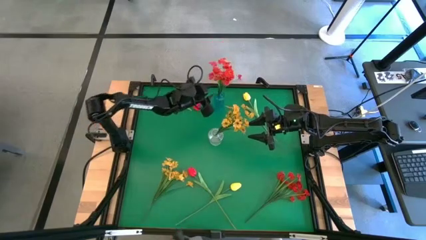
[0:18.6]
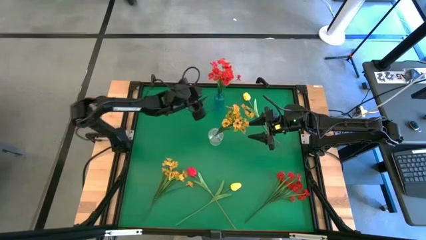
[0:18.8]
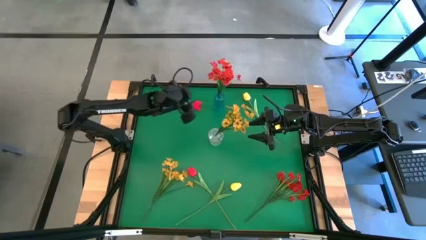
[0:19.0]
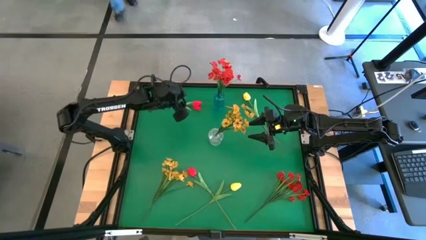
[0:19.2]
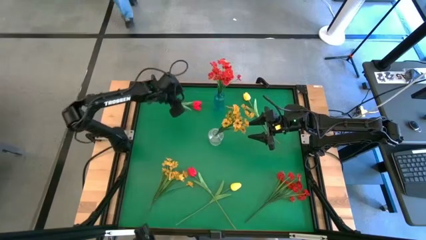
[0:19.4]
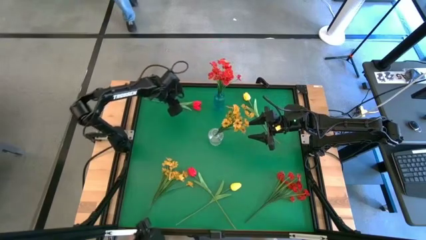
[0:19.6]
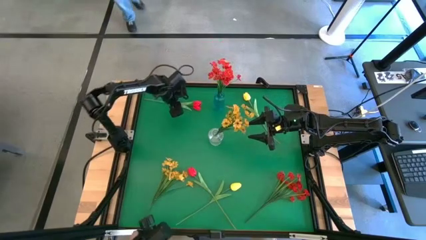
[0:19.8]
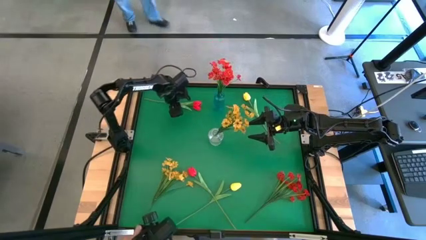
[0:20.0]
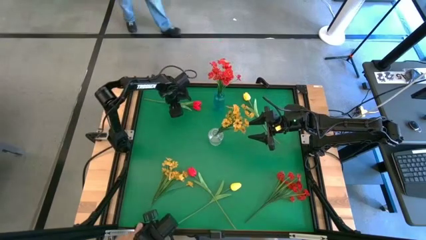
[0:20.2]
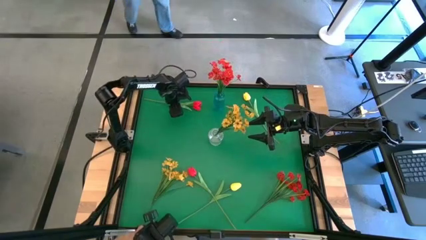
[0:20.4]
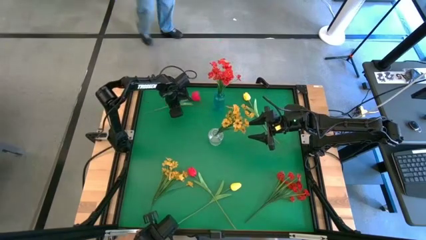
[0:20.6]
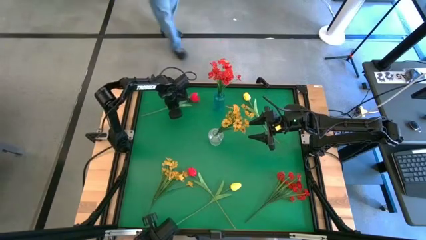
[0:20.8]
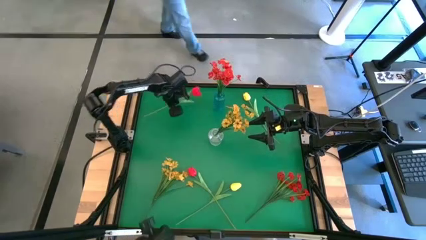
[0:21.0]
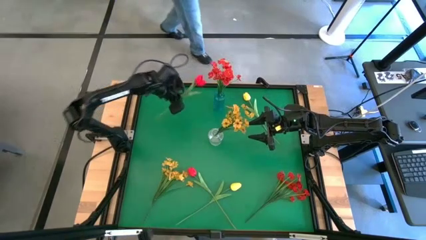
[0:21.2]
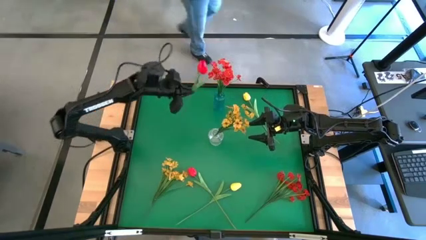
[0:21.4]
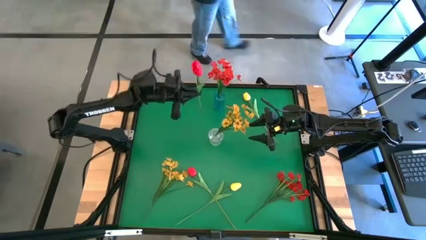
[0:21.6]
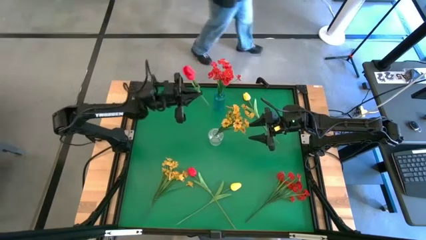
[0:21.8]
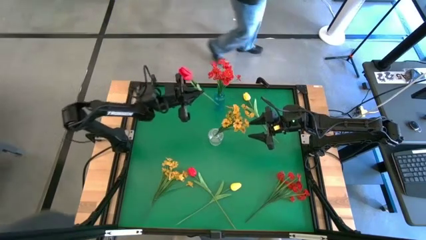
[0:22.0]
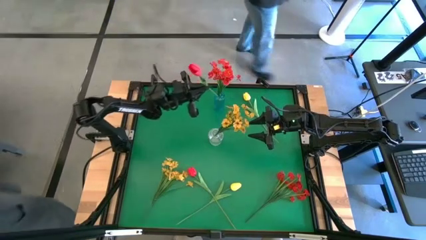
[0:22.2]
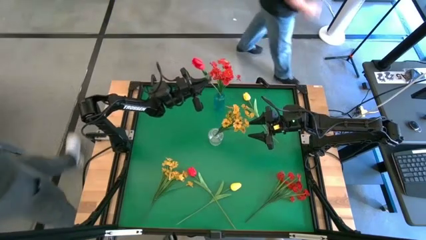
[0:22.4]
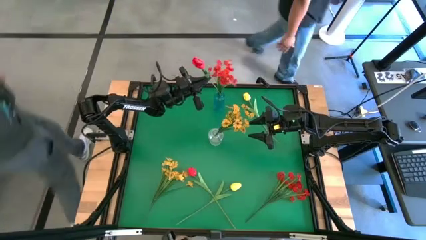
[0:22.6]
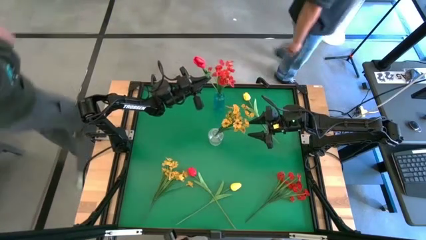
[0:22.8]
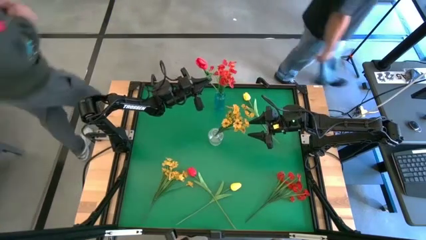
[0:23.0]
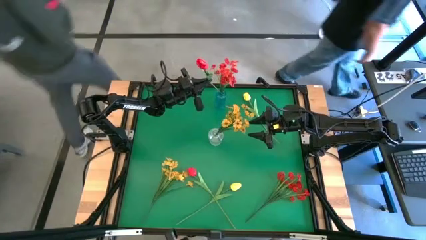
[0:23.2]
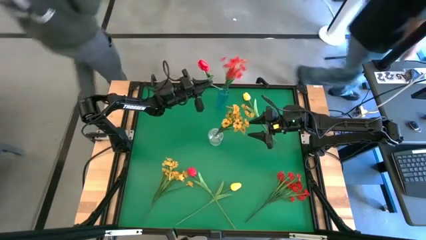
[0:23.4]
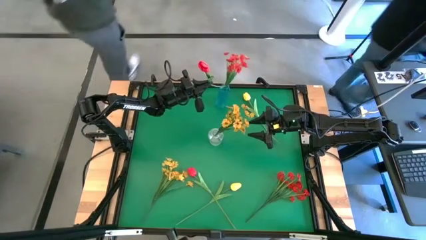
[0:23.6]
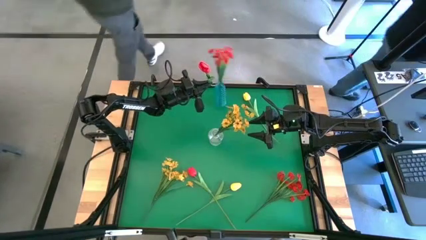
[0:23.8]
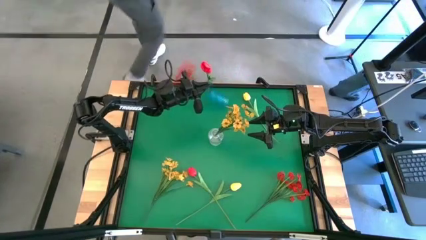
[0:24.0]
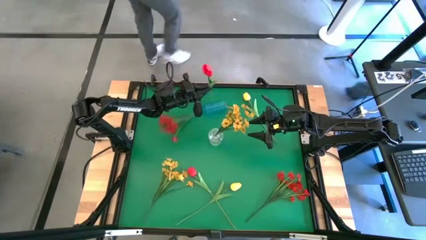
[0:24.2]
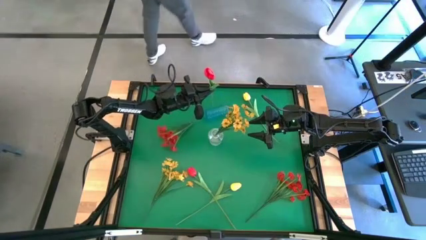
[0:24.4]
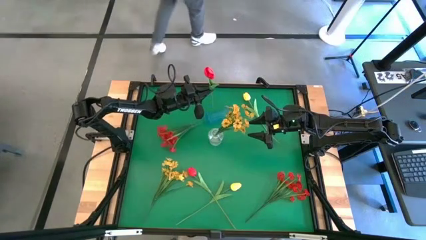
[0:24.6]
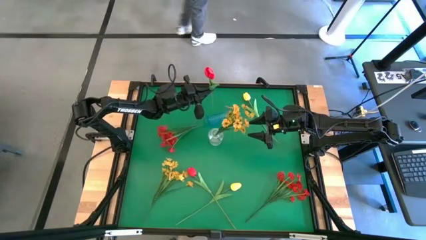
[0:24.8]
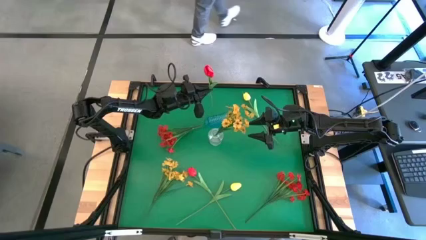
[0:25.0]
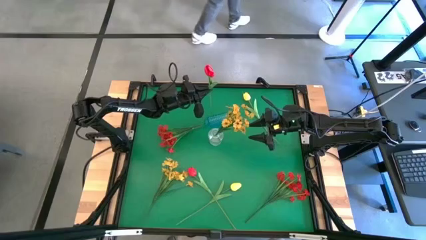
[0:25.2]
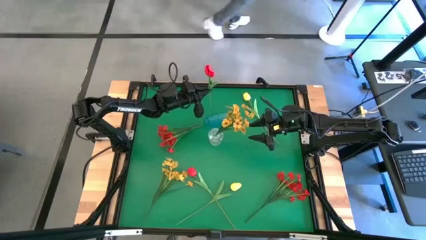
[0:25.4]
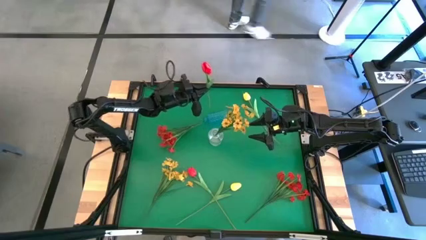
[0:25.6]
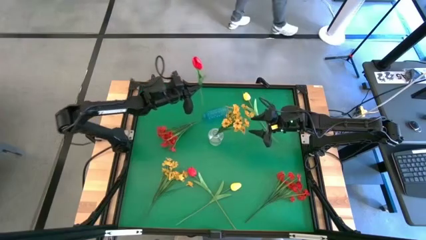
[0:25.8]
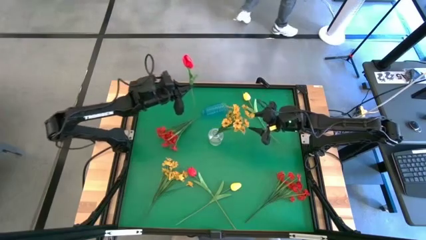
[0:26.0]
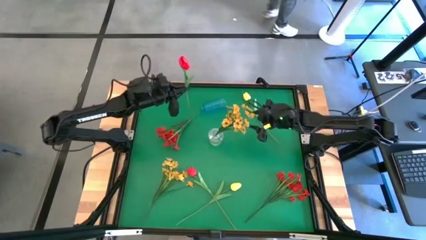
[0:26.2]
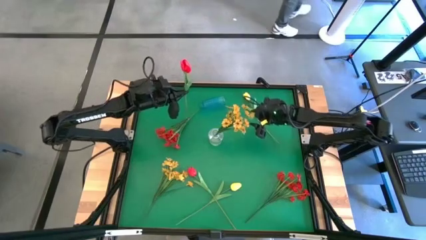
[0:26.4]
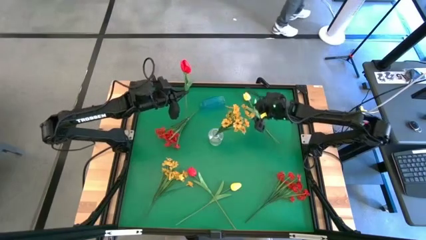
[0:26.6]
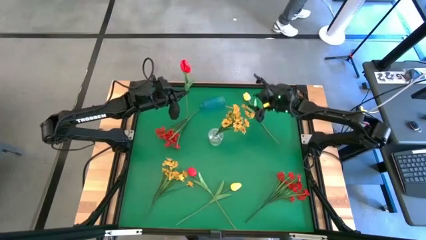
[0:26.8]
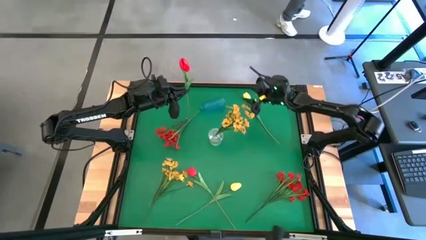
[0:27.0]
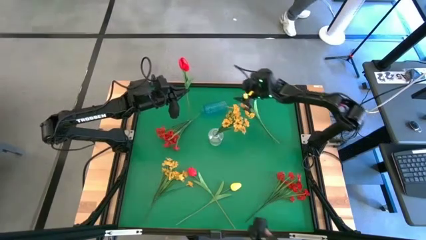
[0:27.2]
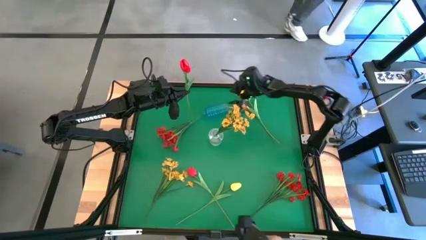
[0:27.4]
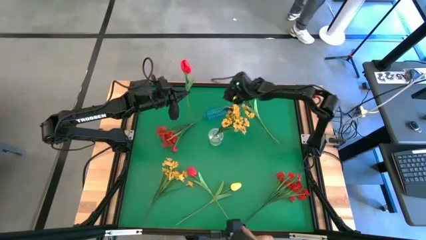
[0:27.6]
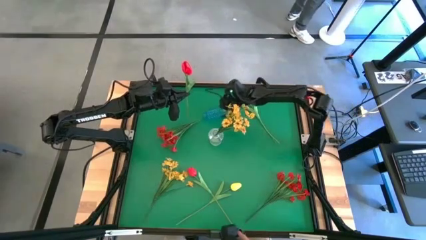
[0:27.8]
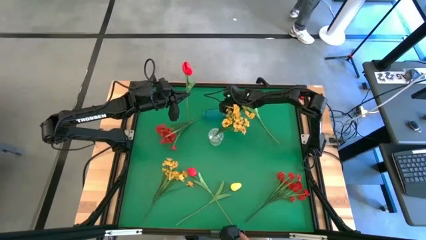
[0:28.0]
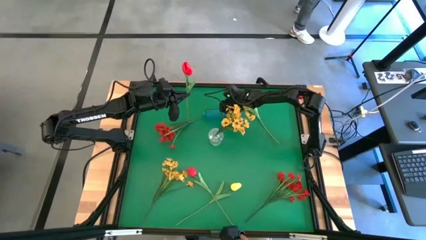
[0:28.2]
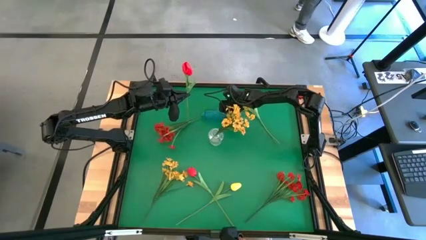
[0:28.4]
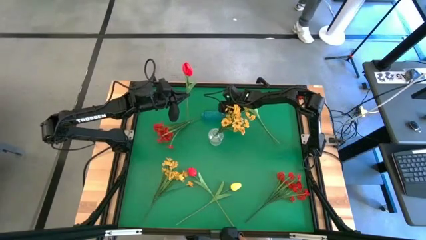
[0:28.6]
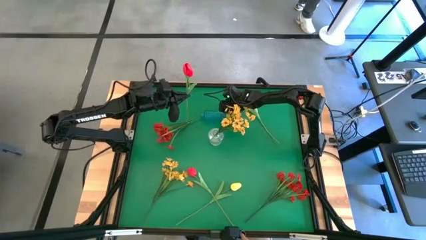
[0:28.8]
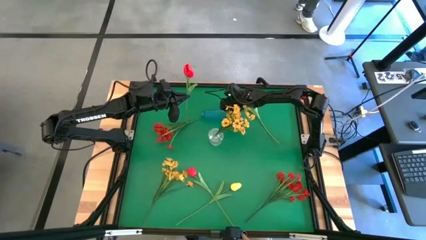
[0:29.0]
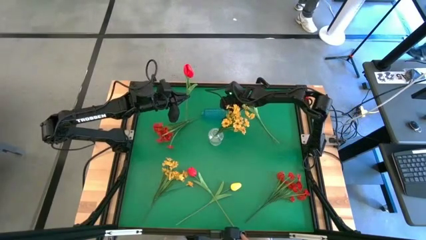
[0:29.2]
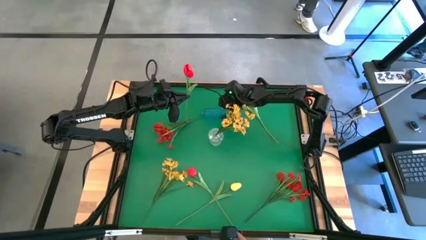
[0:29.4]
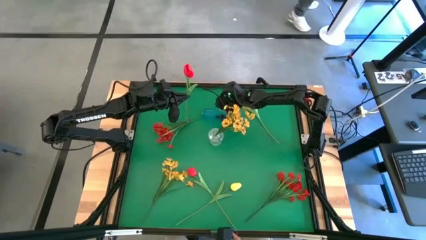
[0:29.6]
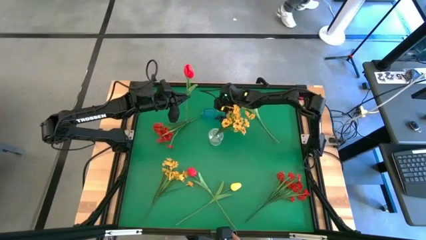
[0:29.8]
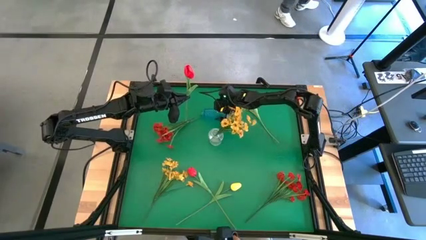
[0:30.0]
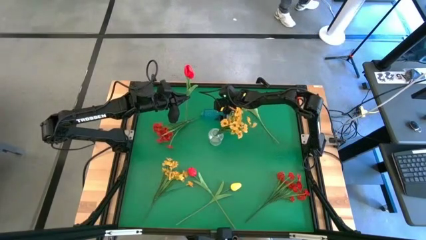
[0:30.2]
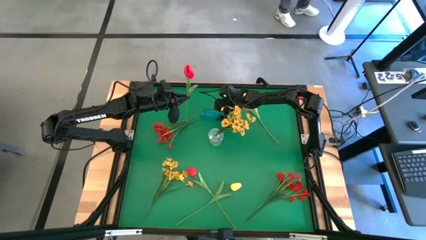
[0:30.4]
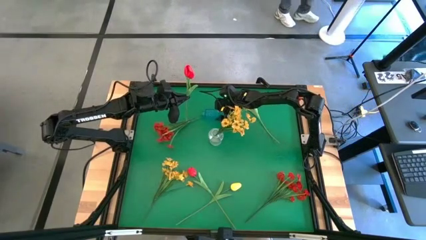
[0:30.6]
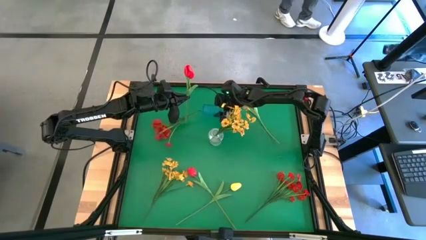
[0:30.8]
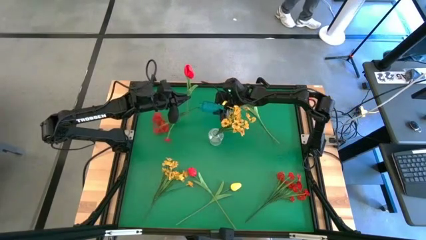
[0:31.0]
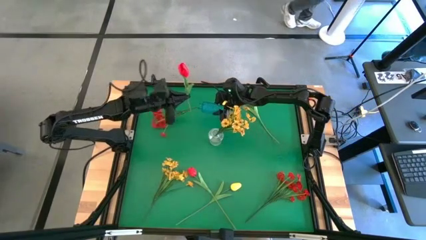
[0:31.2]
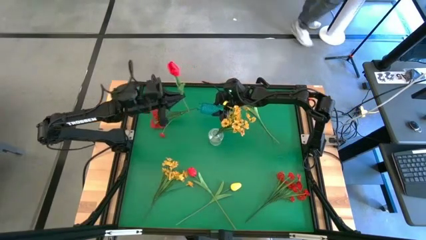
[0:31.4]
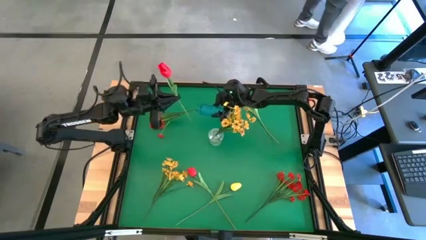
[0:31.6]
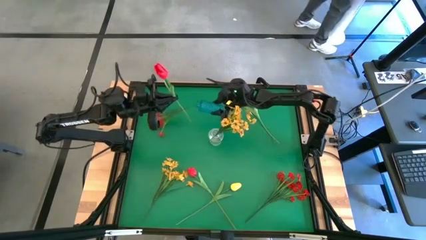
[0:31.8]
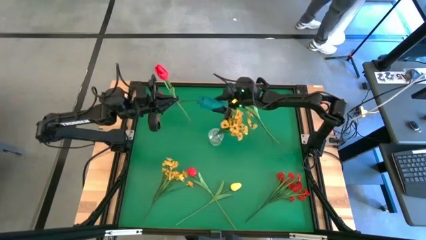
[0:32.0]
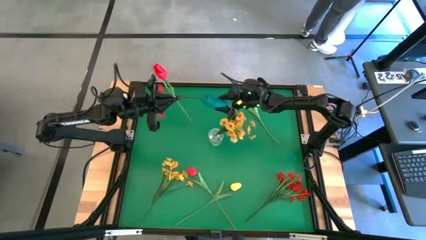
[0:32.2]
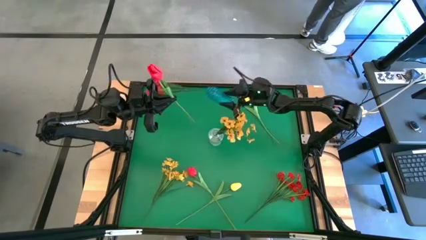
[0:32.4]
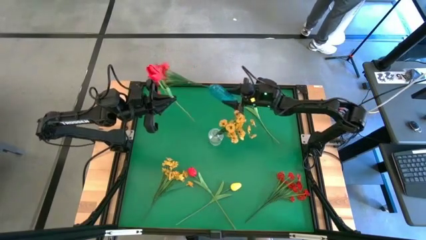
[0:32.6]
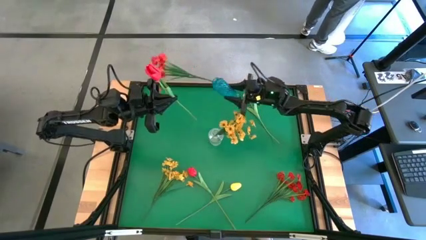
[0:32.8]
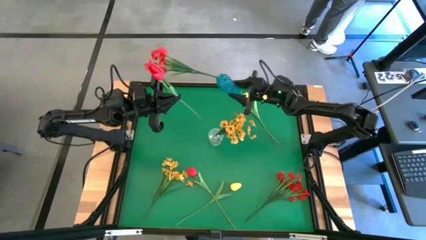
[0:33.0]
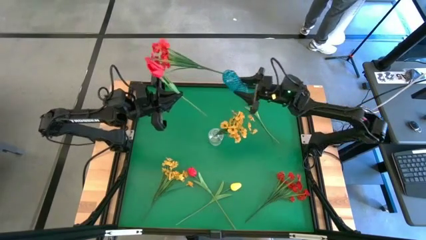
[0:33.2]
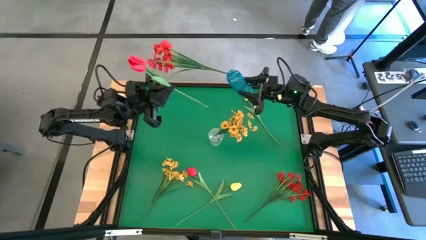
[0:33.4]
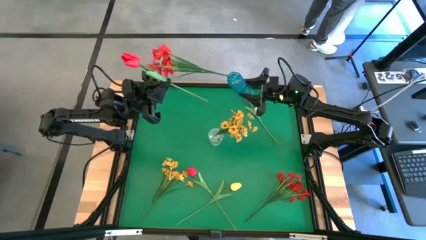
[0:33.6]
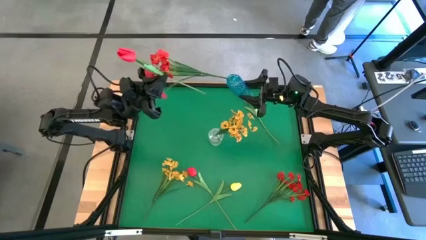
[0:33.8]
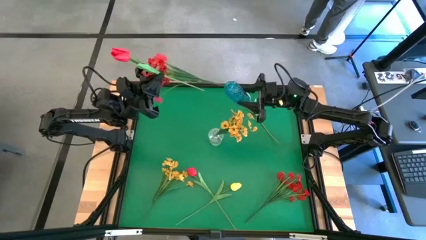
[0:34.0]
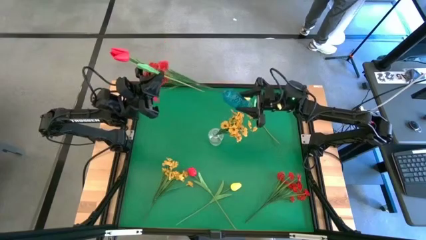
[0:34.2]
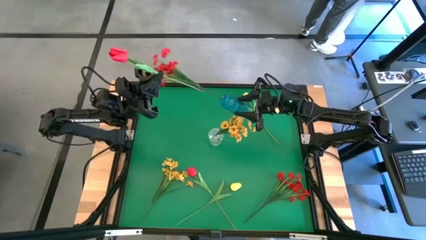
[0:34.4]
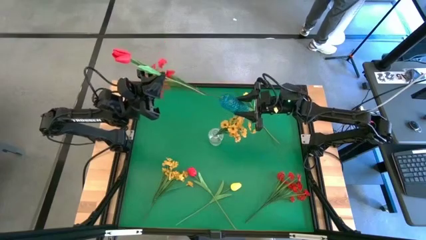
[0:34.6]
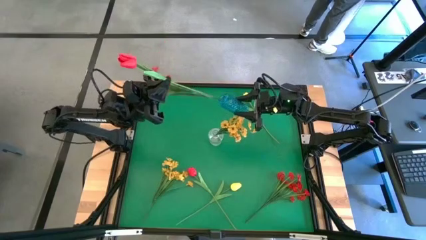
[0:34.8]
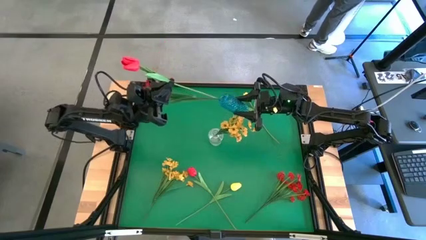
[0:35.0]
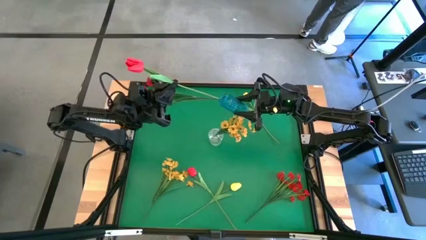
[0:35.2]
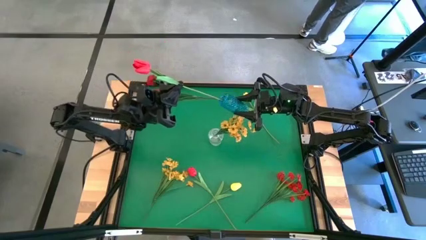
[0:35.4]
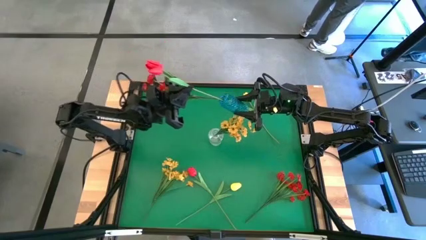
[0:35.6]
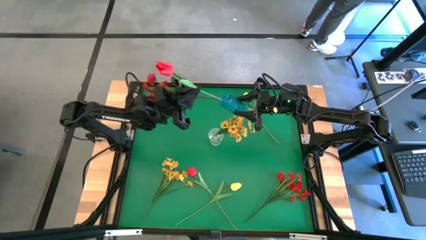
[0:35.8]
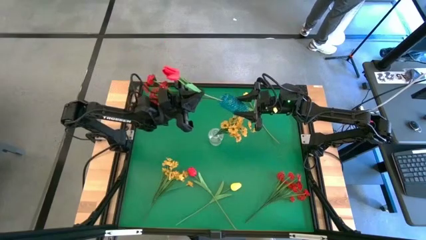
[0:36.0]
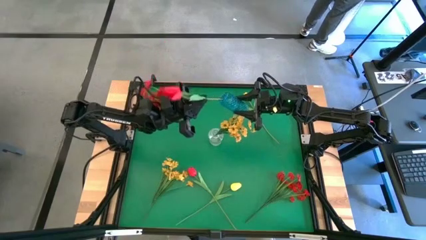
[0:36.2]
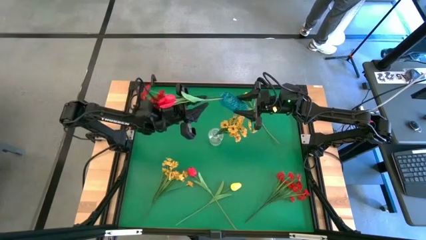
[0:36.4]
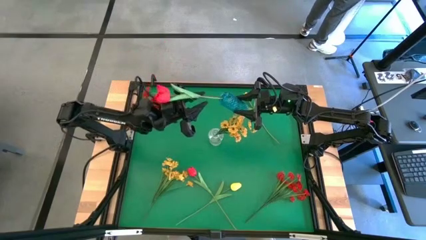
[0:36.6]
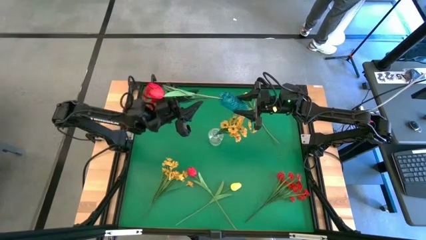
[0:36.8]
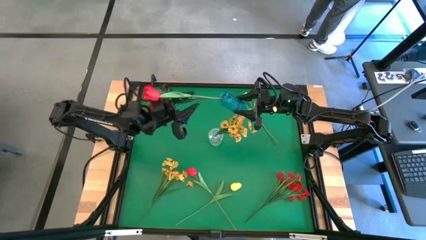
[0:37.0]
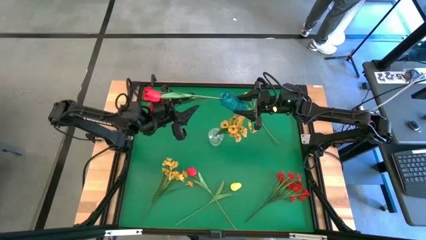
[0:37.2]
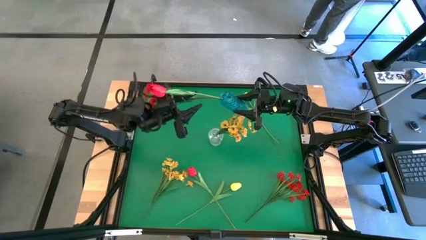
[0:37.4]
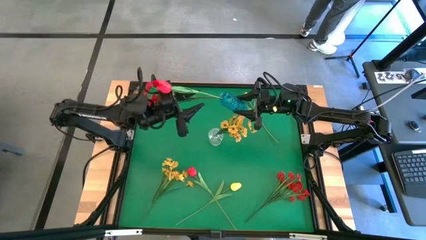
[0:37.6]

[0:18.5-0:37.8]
Task: Sort flowers into vase by color
Put the top red flower into the blue vase
